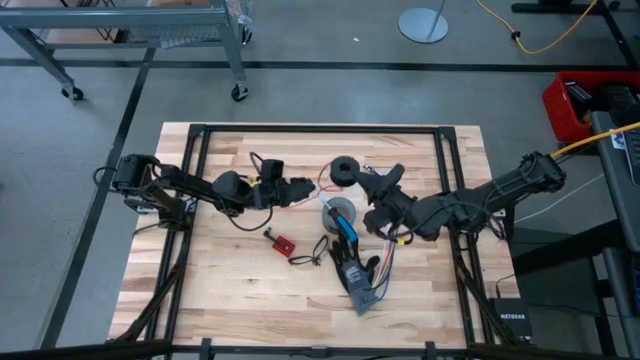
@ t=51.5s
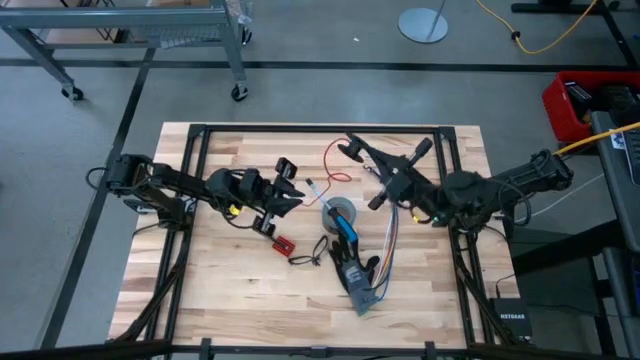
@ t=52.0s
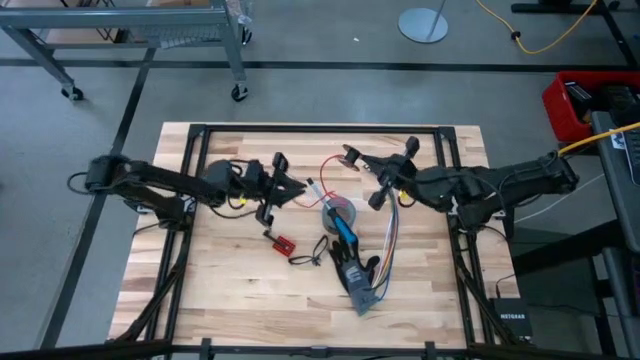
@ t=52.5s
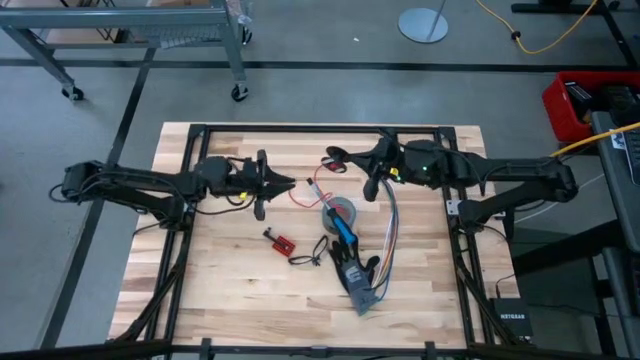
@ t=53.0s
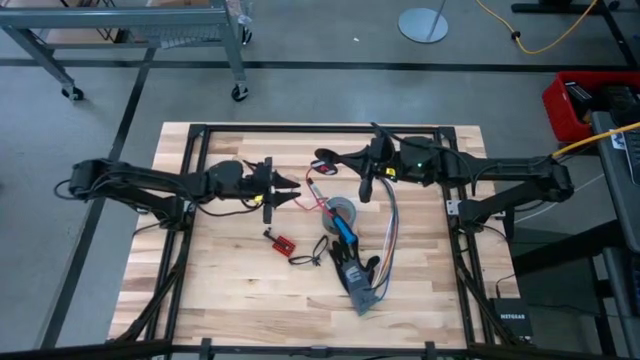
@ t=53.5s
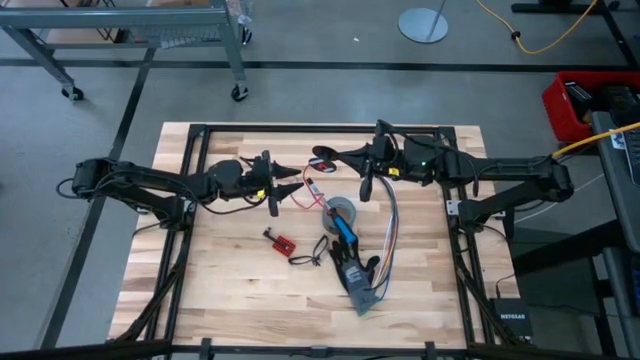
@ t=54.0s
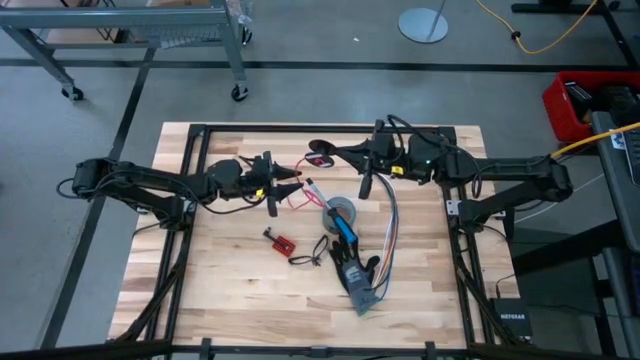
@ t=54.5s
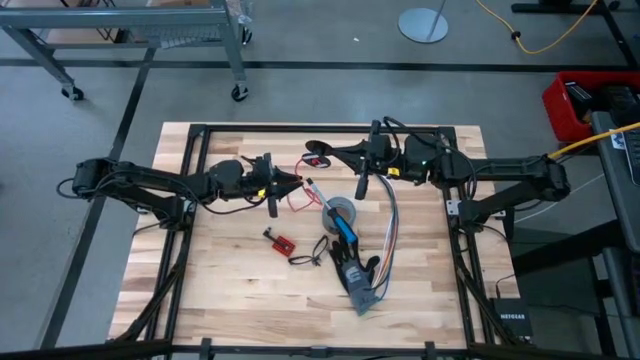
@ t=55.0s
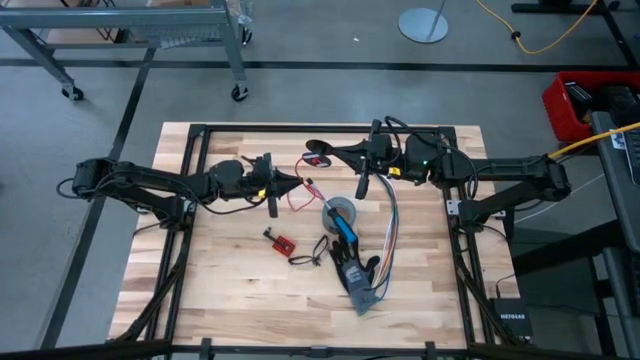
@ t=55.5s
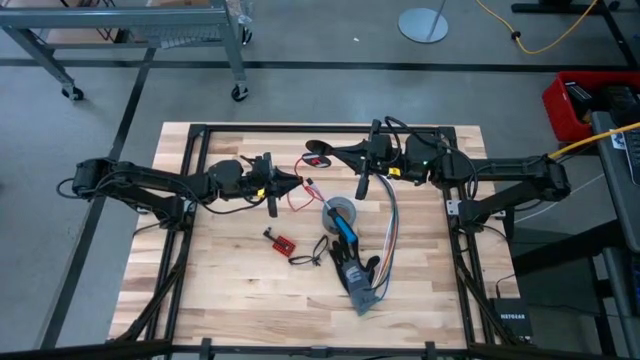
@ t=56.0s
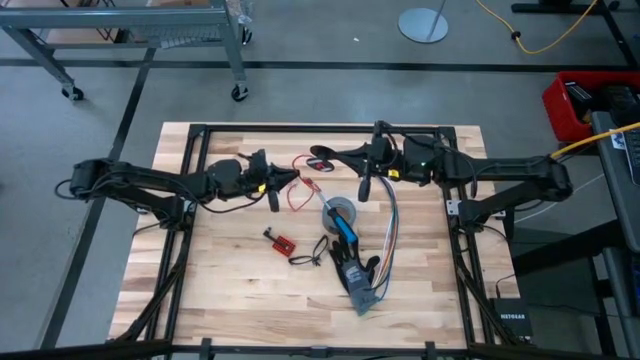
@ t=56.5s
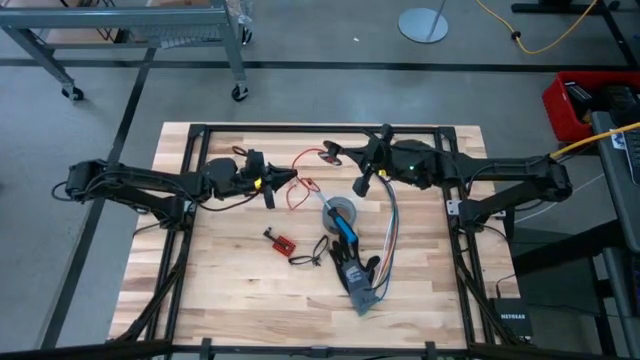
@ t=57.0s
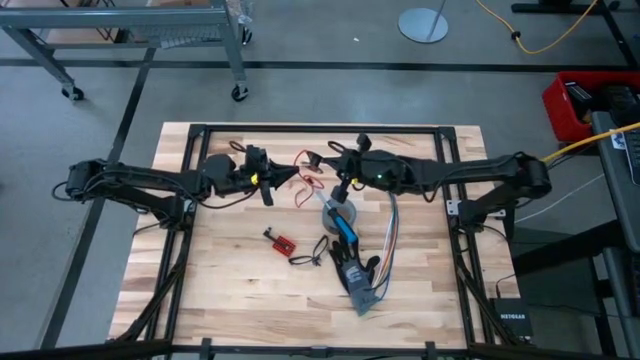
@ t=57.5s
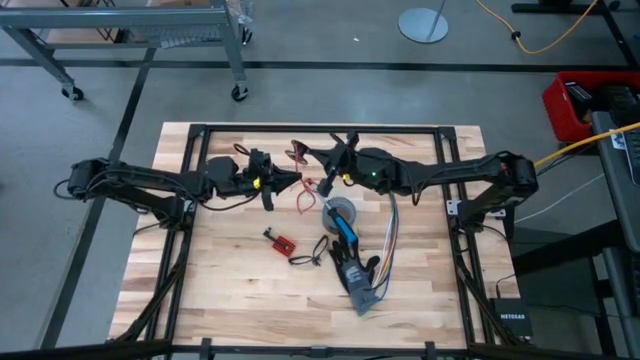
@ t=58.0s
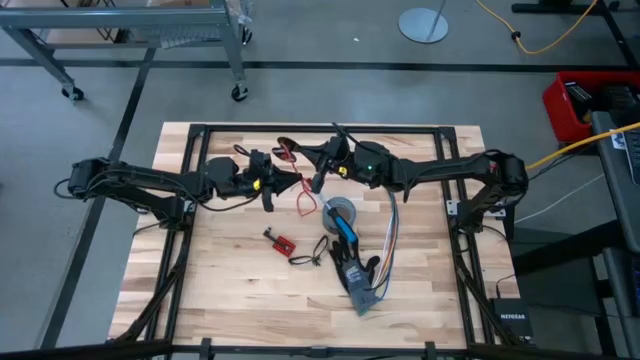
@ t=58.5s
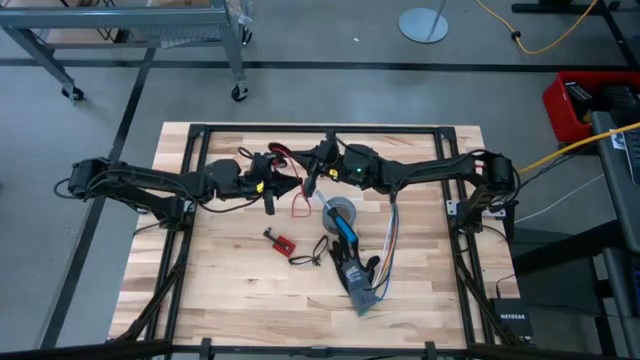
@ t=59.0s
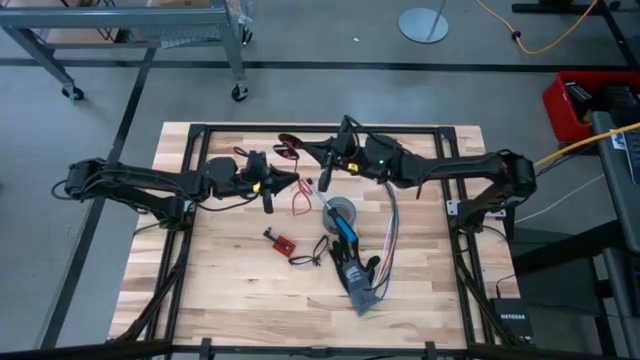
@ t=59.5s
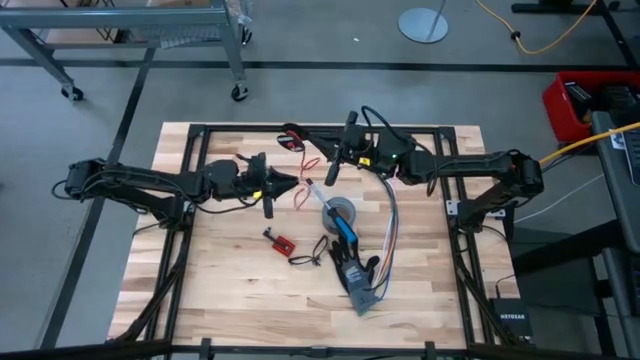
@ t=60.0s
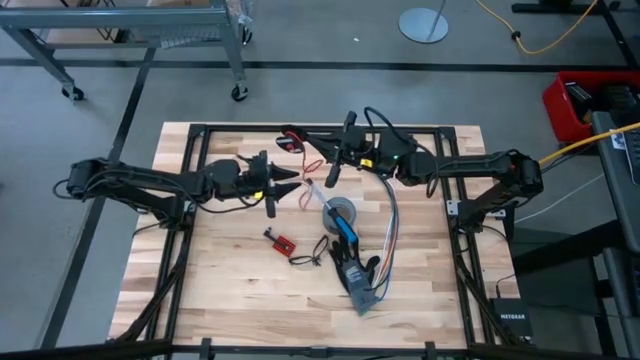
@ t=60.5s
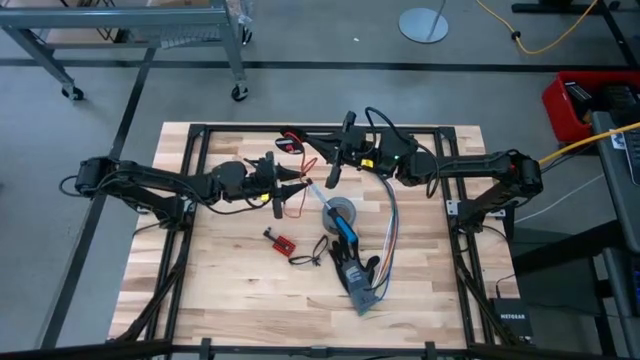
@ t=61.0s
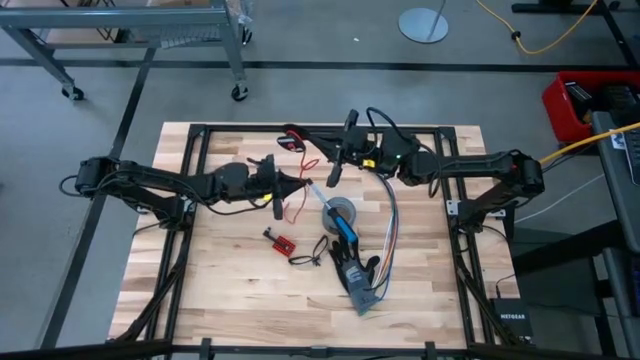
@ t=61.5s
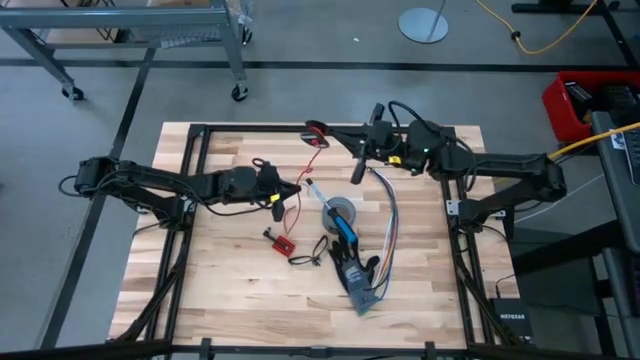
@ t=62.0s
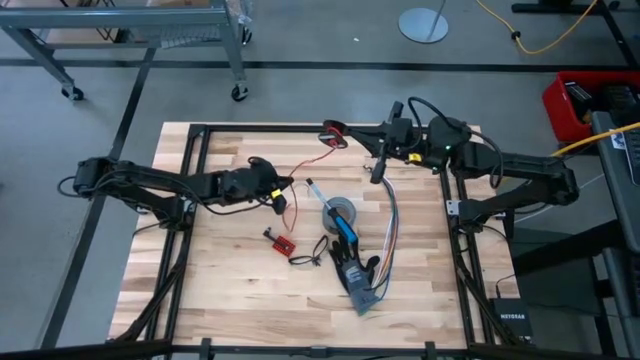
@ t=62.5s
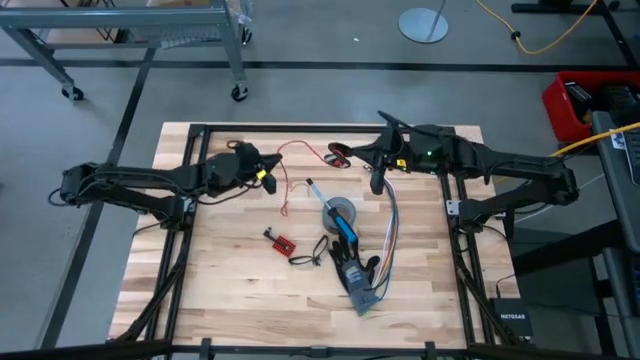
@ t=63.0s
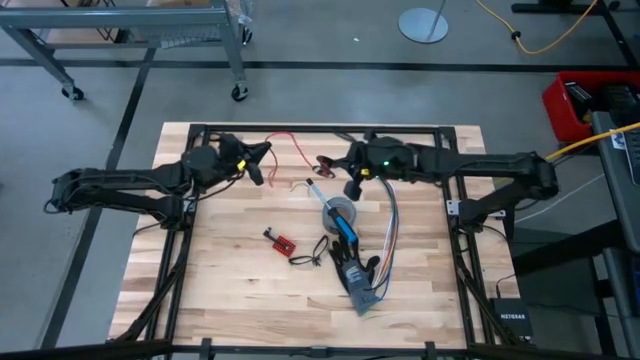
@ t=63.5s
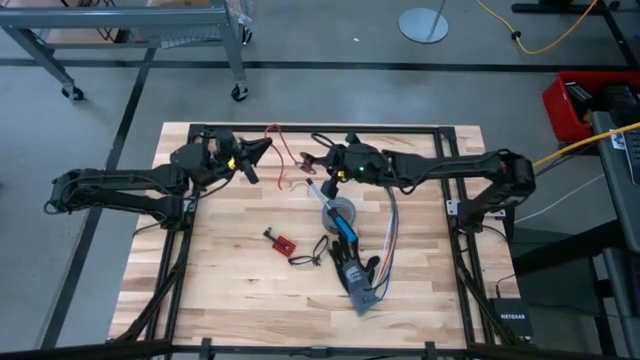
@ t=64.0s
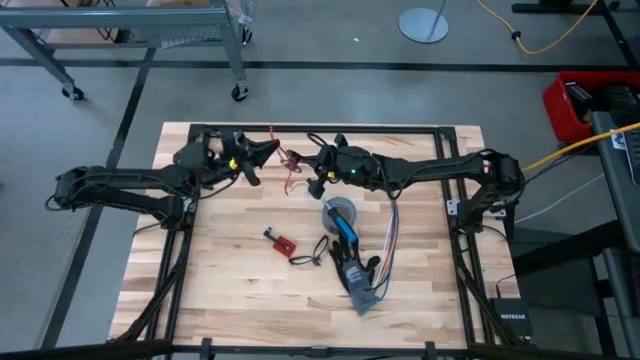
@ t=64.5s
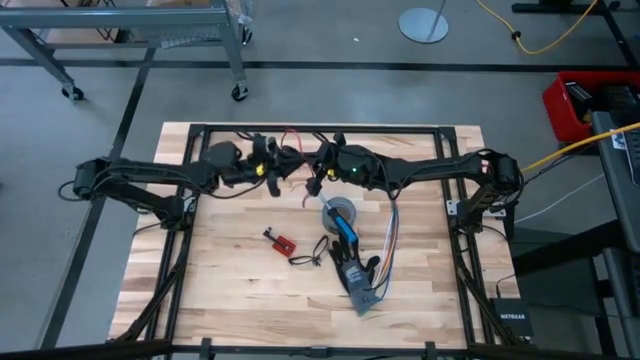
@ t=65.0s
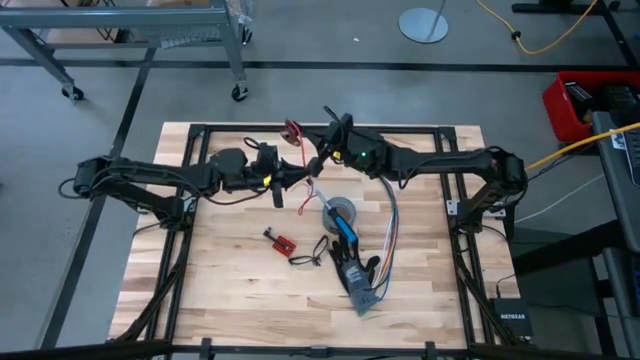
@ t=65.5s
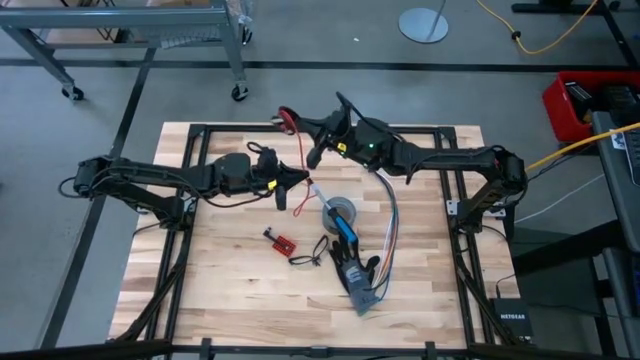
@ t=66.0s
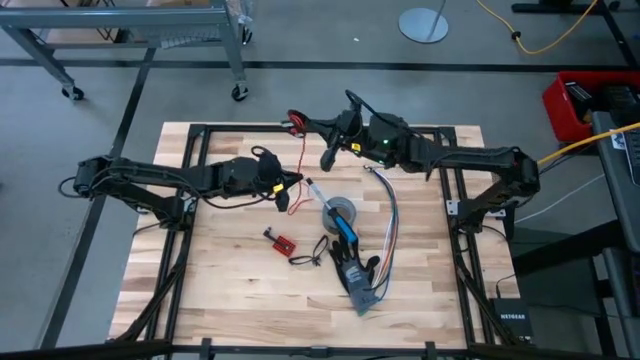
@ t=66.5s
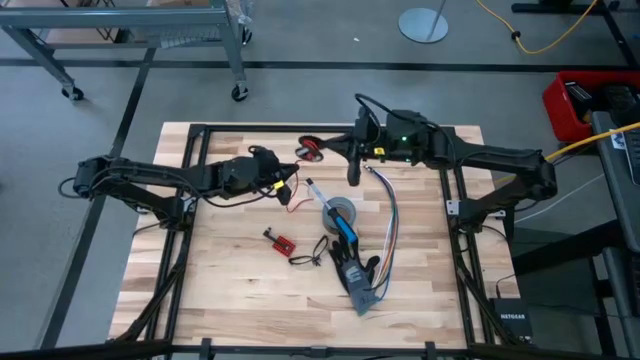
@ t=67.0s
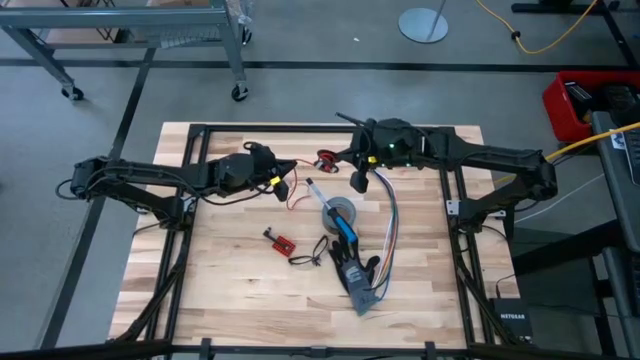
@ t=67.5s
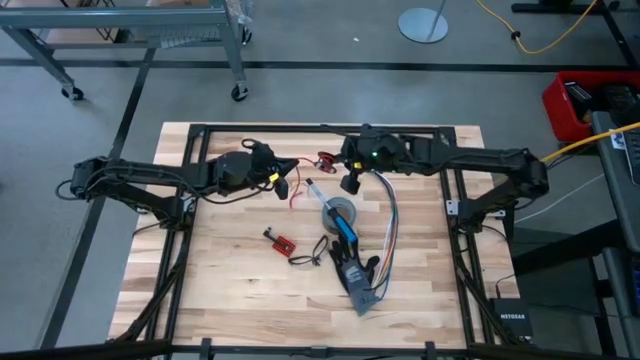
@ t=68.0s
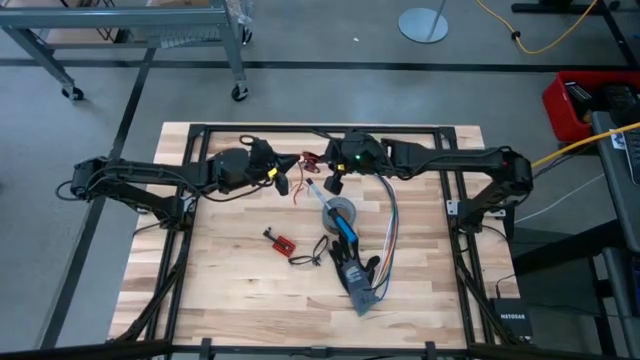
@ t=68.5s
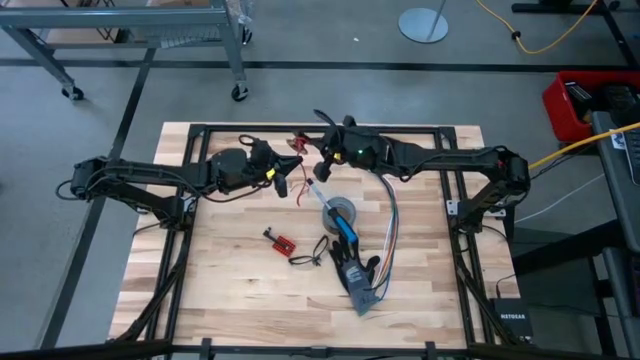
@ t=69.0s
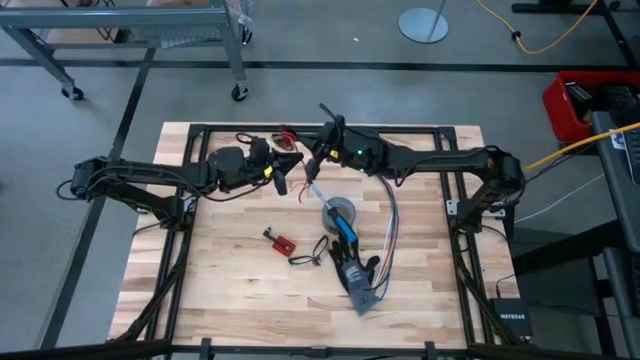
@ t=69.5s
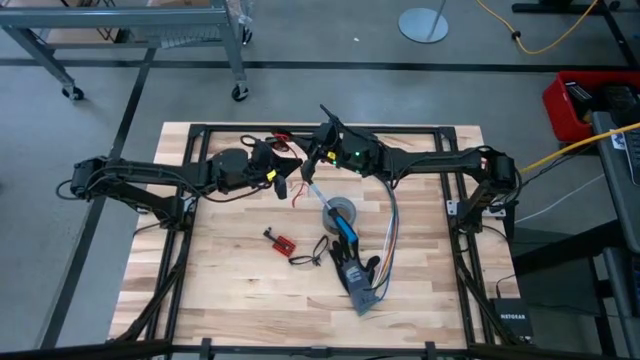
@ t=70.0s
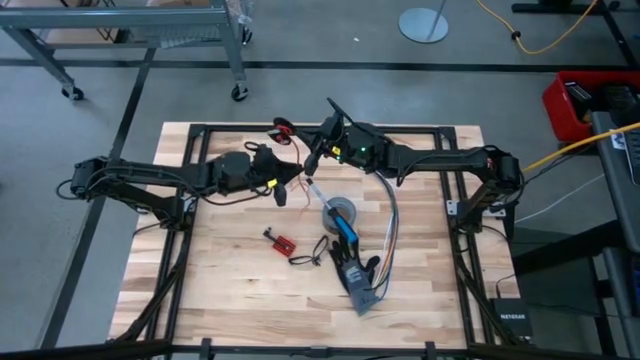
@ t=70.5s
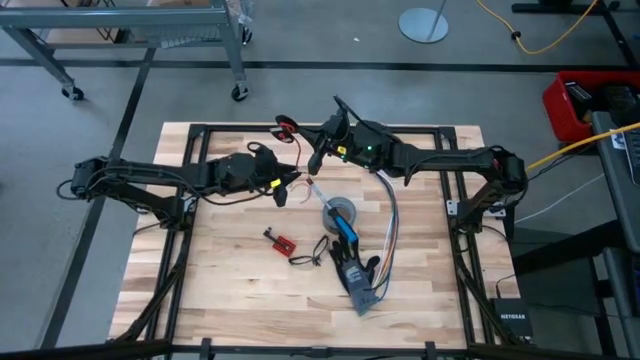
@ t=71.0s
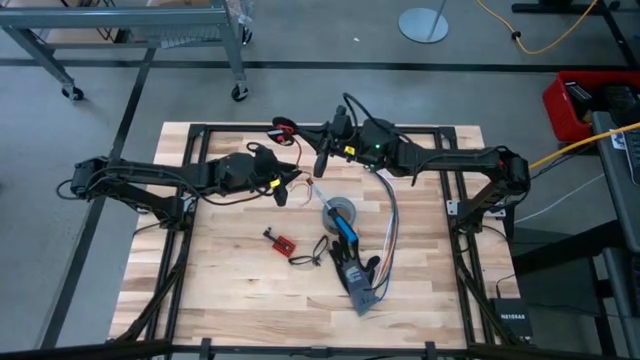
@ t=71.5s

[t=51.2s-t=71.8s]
Task: Coil cords
Coil the red wire around the spool
